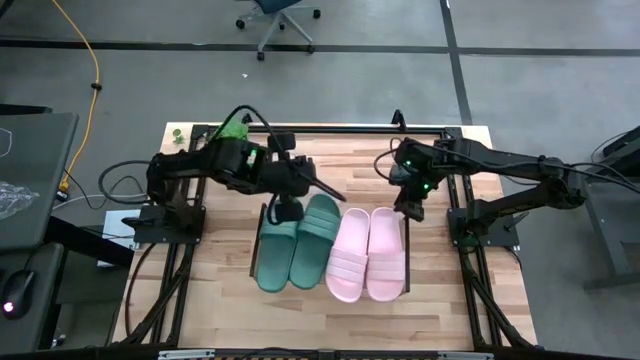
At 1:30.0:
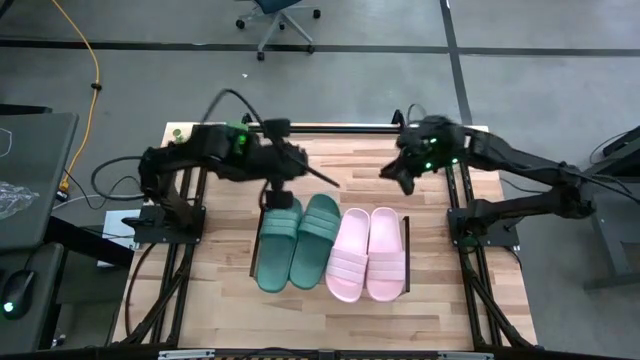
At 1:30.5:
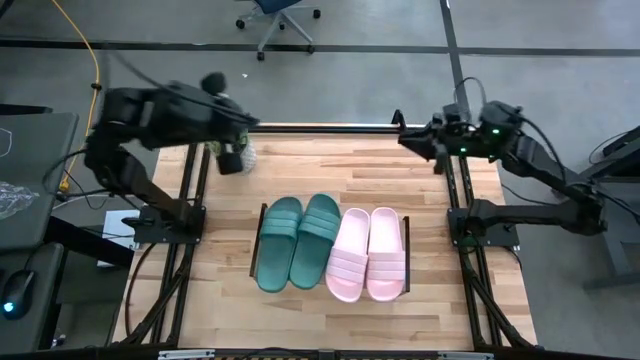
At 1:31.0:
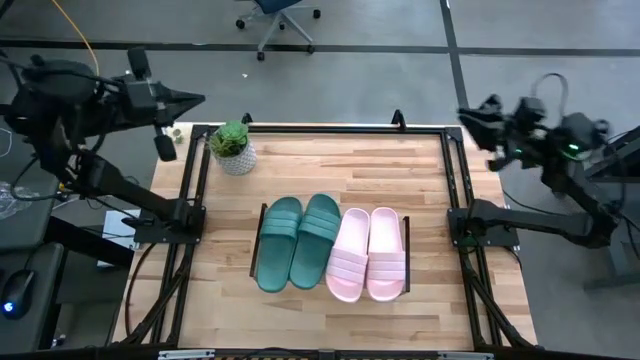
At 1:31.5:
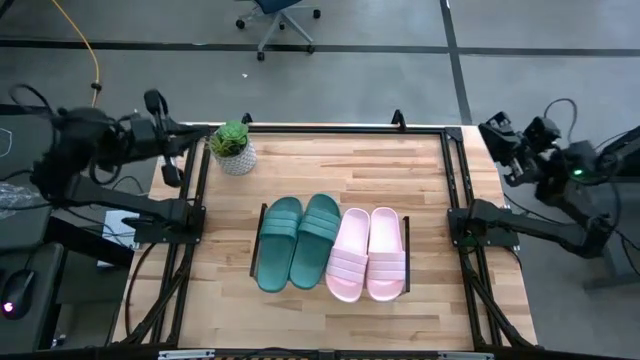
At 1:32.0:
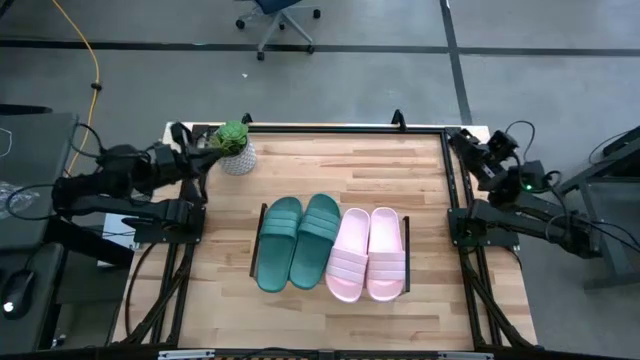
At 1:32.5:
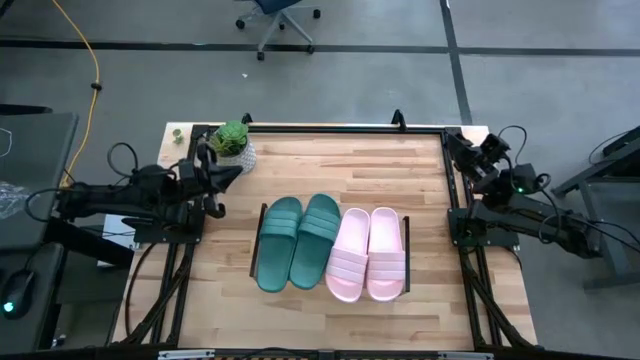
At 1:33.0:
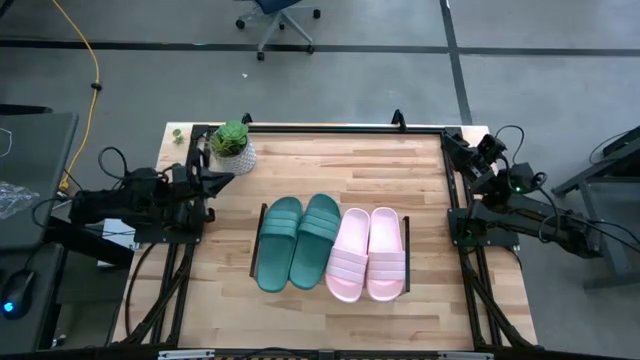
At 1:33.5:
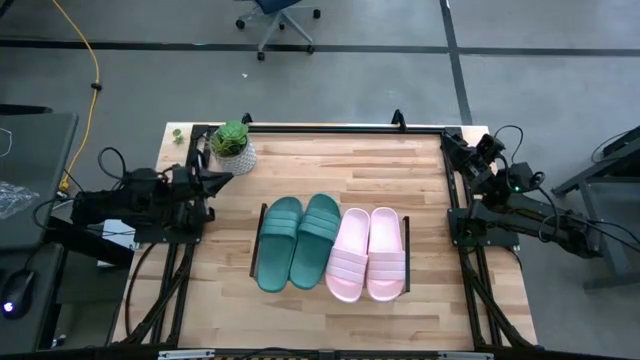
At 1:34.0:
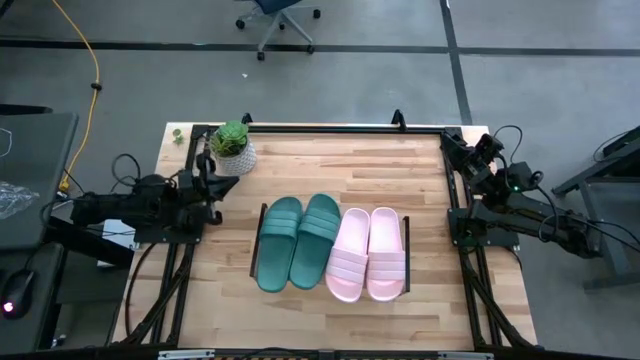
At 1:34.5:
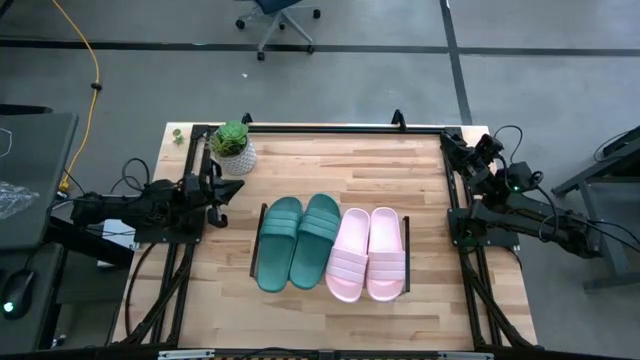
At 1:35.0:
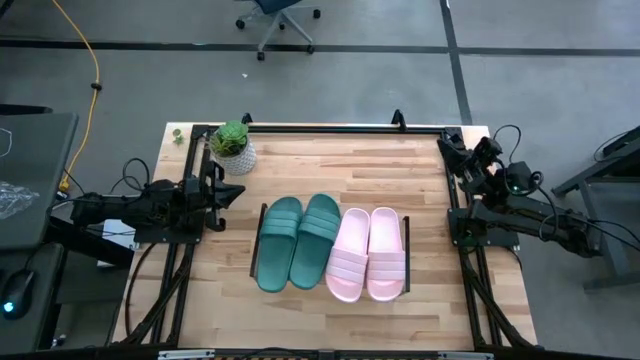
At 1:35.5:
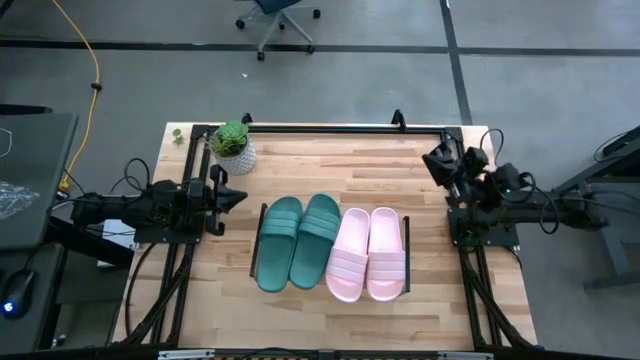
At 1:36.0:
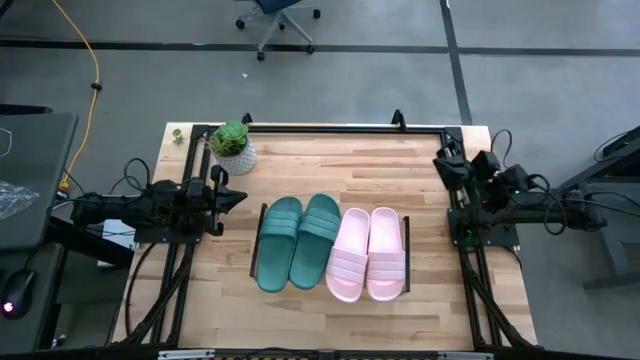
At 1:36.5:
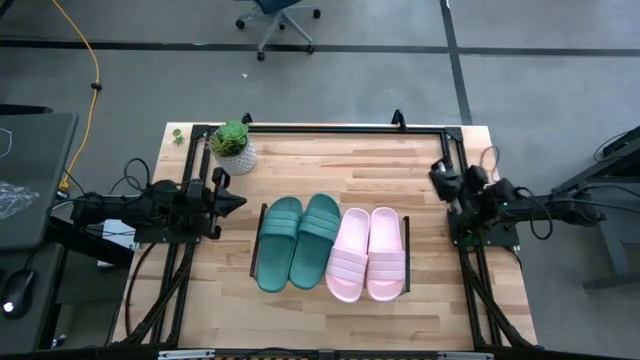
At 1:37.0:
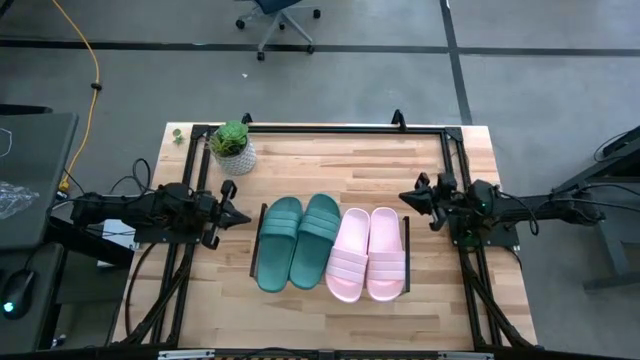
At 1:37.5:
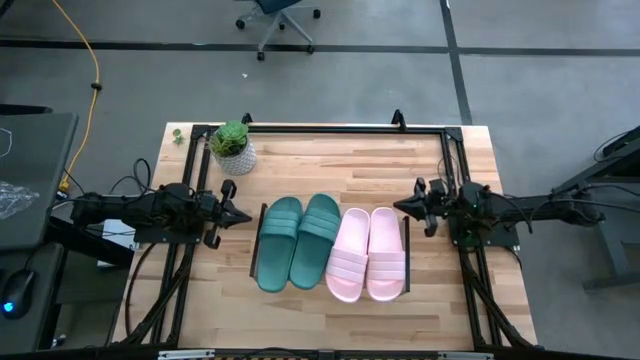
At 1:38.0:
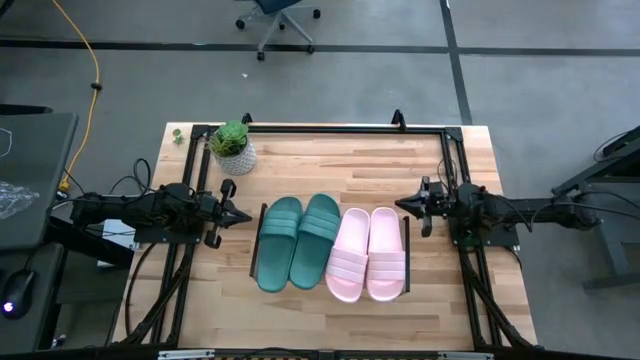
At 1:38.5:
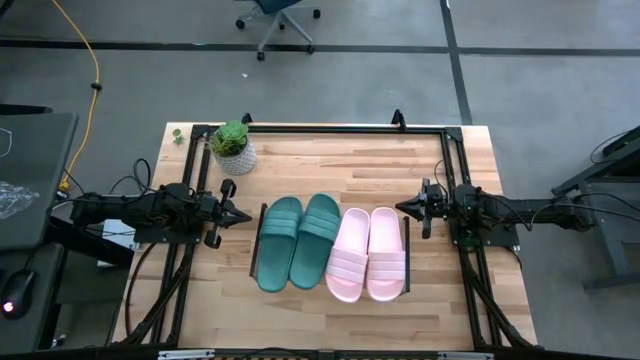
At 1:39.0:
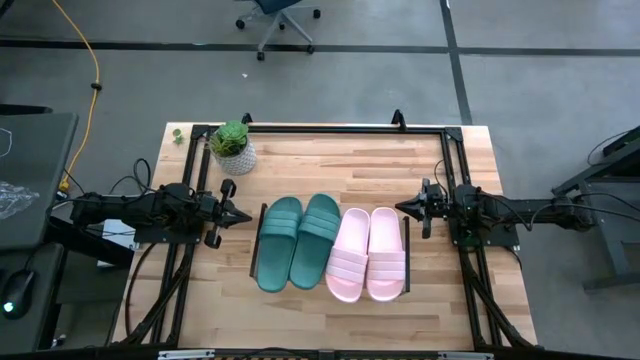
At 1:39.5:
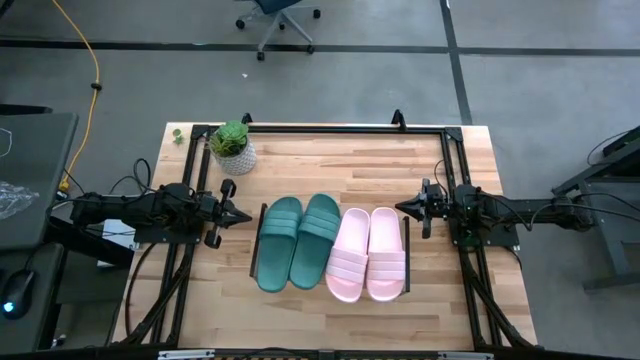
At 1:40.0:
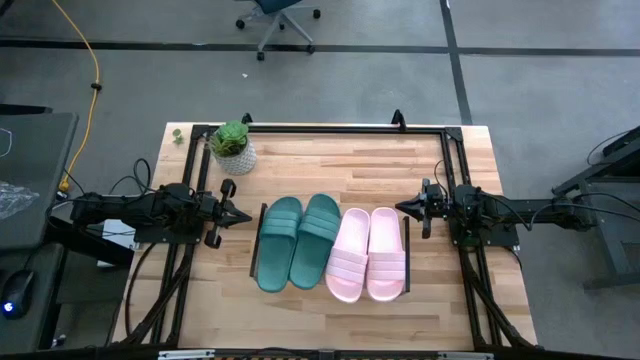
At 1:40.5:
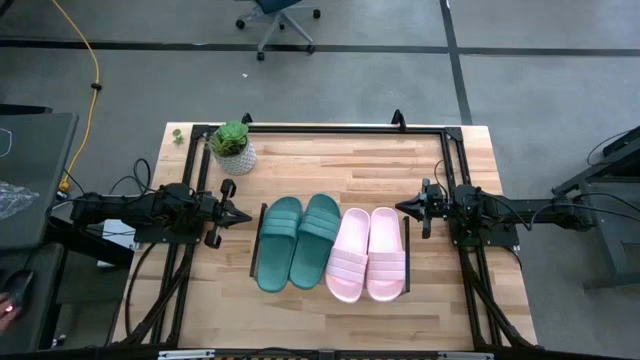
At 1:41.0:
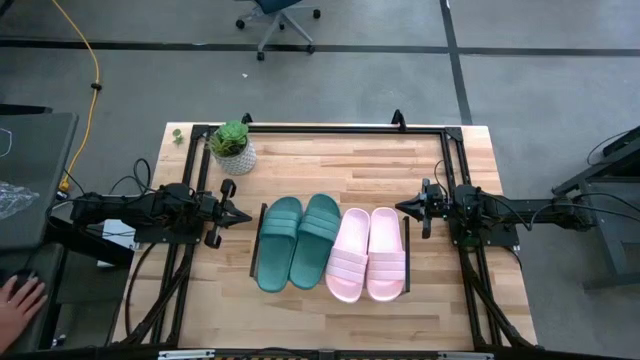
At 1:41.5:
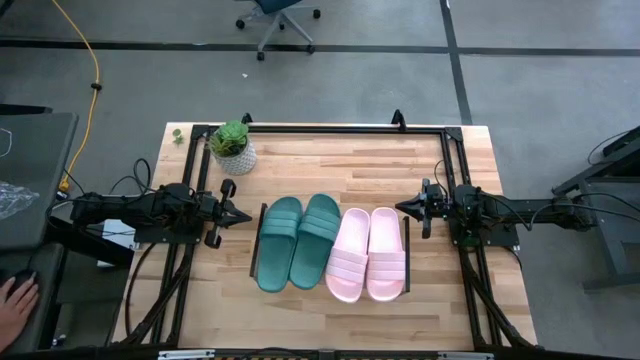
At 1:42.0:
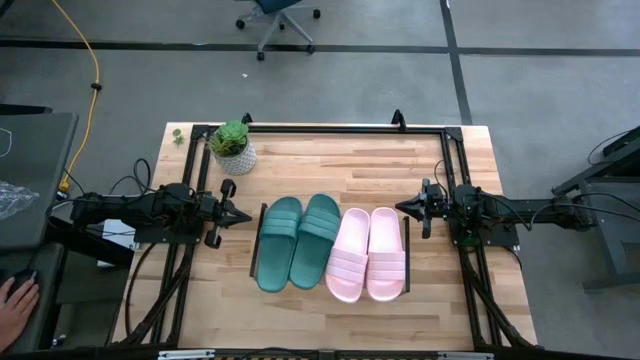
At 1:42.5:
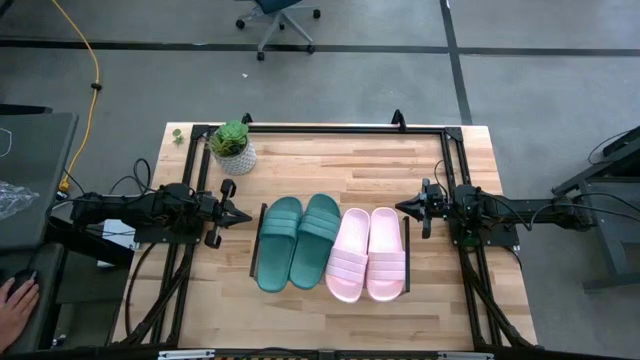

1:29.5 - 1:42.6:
Task: Pick and place slides into the shelf
Return to Home Position

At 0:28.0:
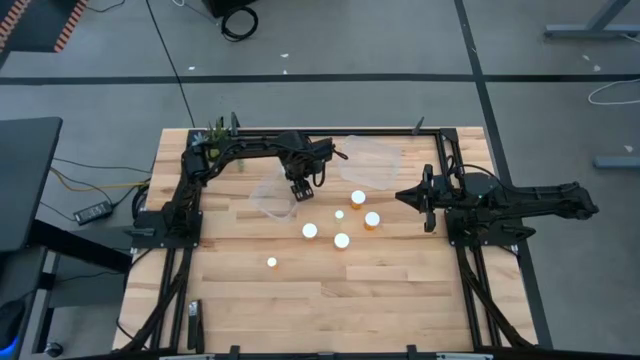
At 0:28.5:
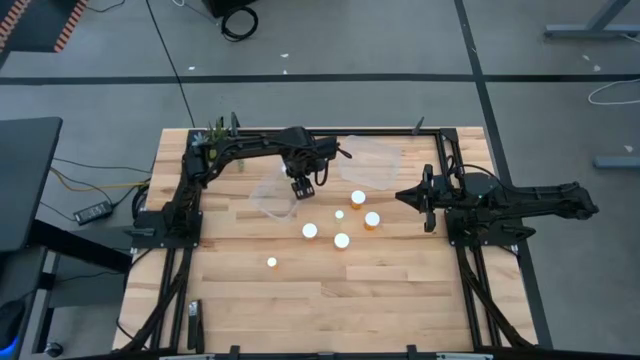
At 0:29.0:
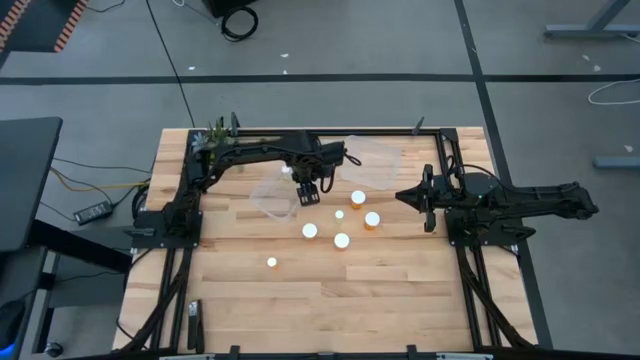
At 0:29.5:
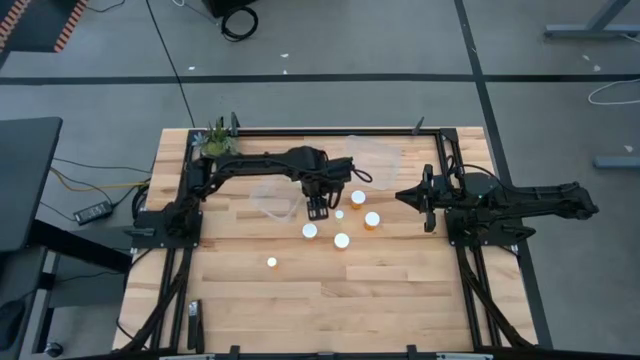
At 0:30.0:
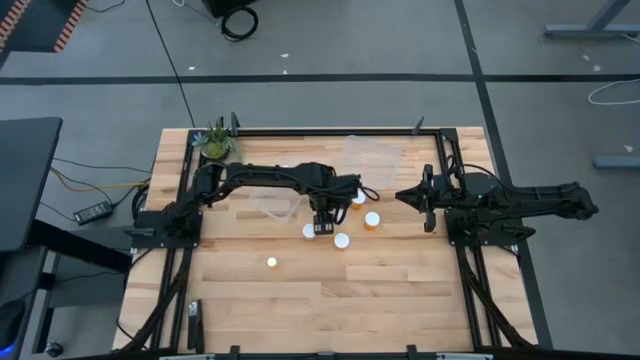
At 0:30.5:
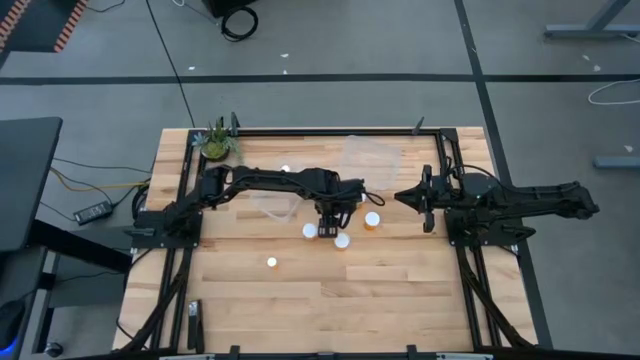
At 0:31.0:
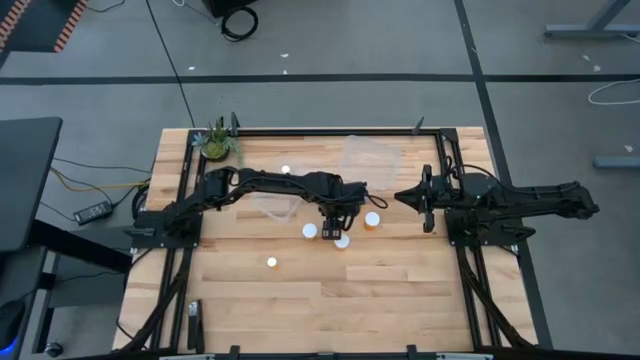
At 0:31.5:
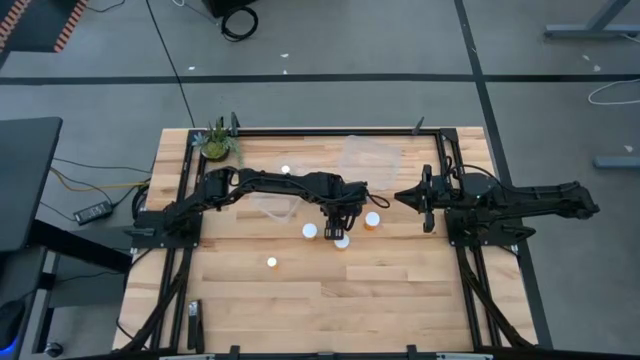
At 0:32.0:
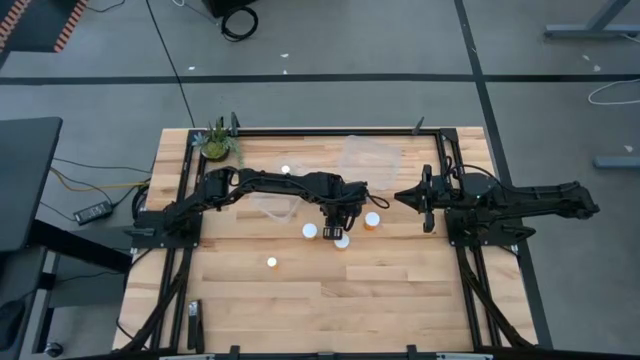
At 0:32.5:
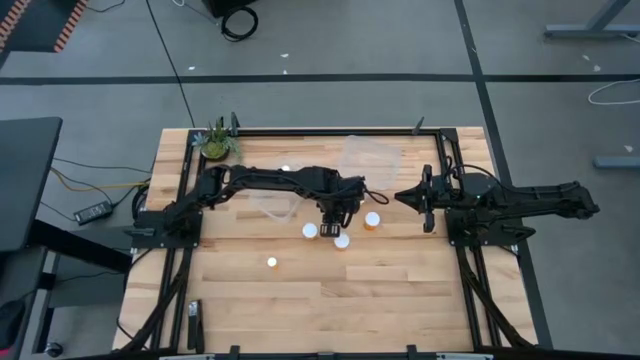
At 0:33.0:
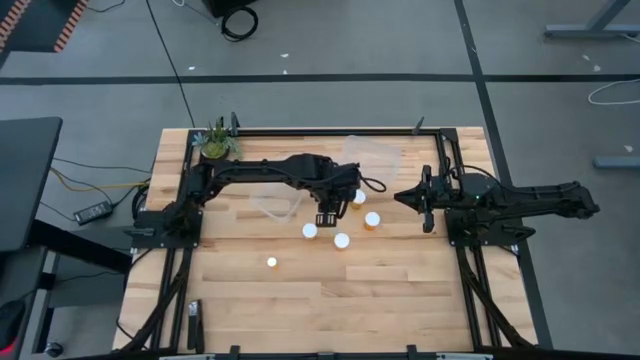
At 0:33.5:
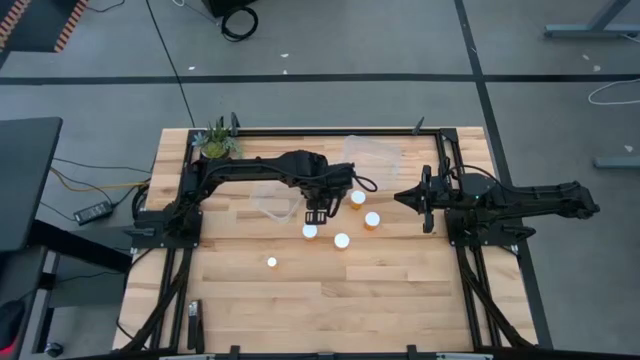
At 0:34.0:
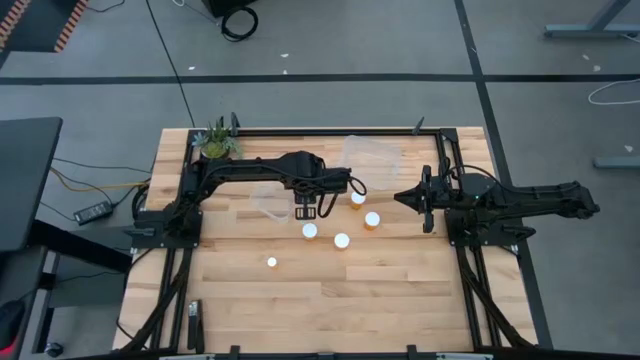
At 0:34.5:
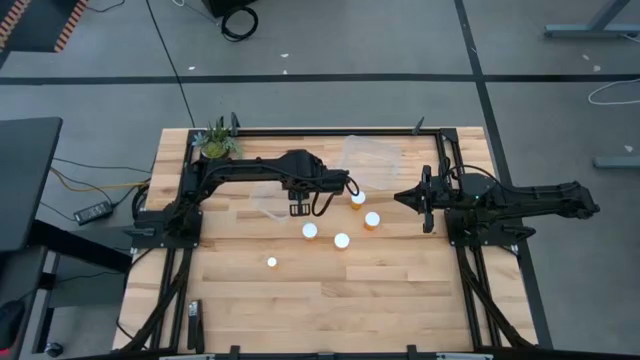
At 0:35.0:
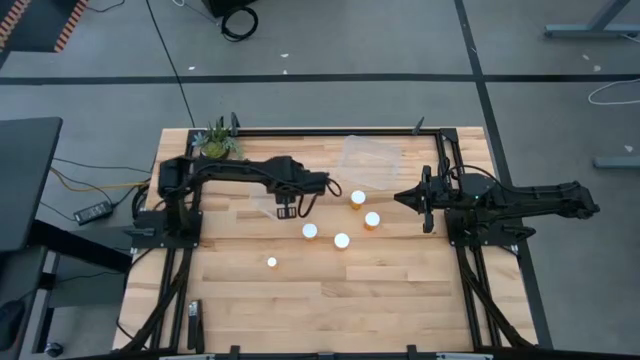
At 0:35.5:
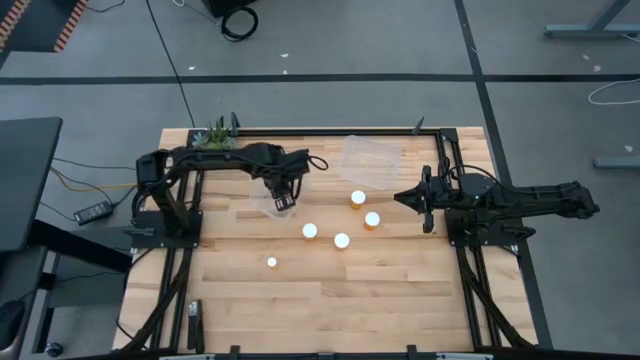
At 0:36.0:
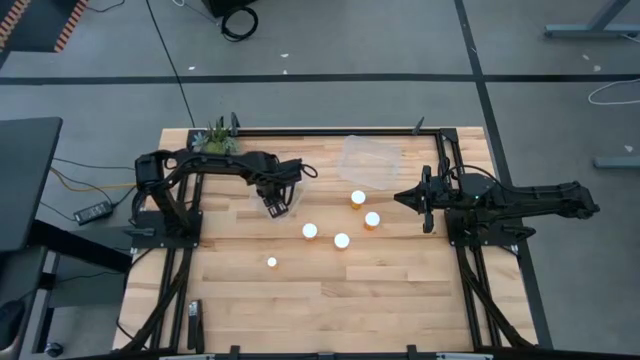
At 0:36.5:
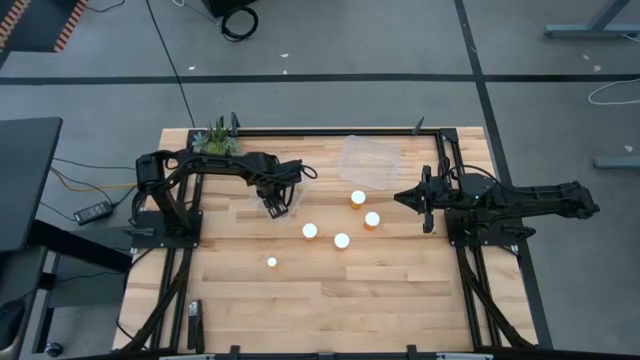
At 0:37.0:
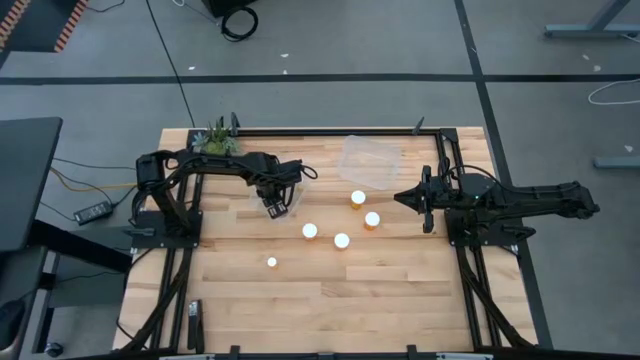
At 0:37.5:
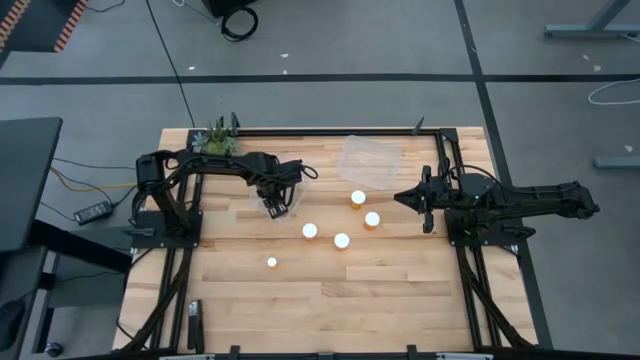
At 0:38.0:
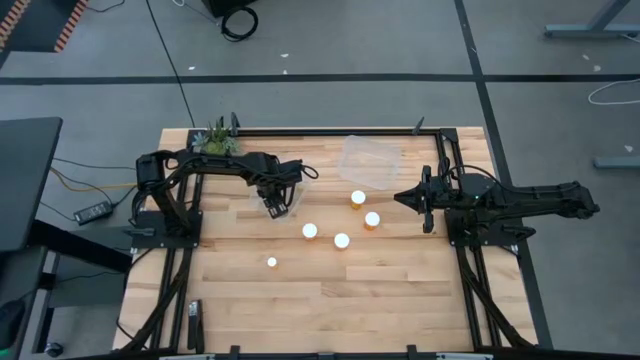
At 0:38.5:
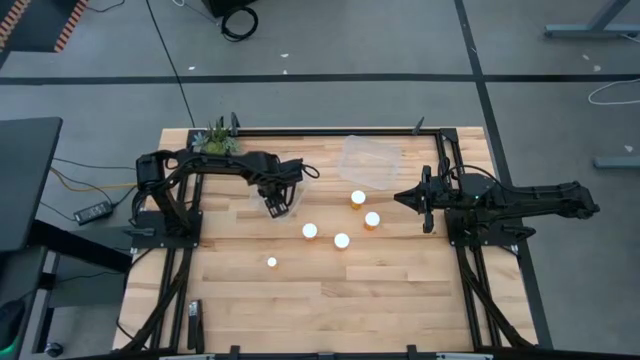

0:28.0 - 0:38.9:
Task: Pick and place medicine bottles into bin by pill shape (circle, oval)
Put the small yellow pill bottle into the left transparent bin
